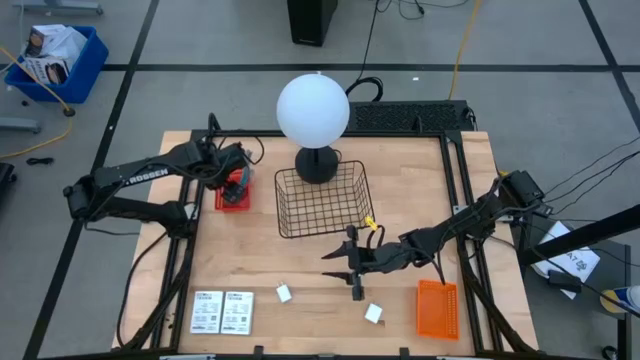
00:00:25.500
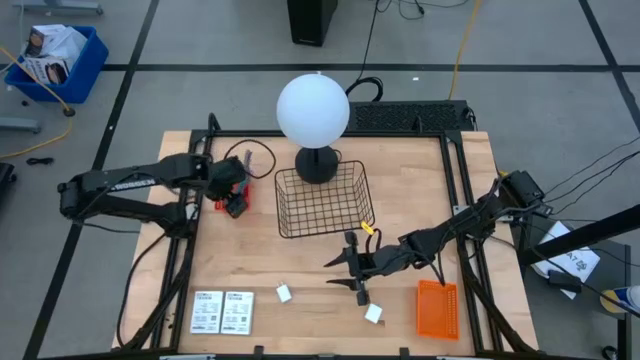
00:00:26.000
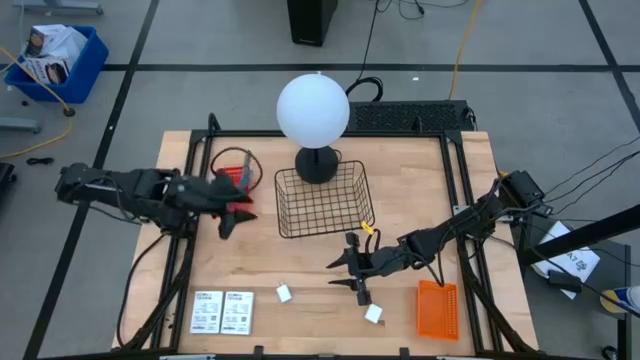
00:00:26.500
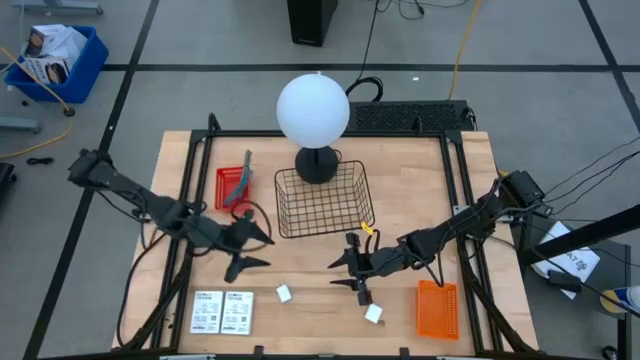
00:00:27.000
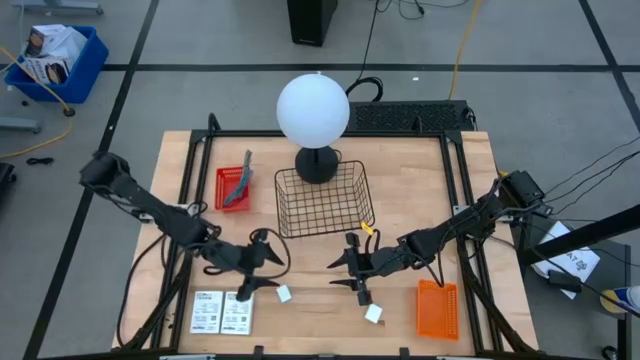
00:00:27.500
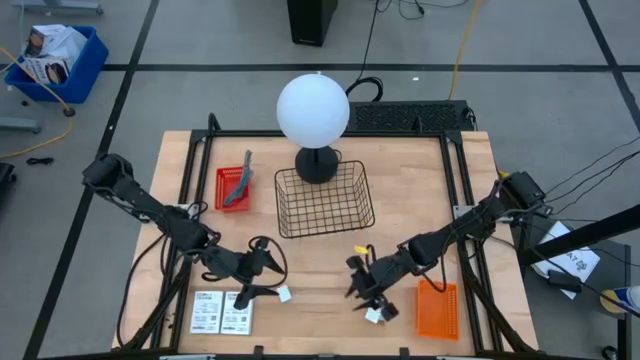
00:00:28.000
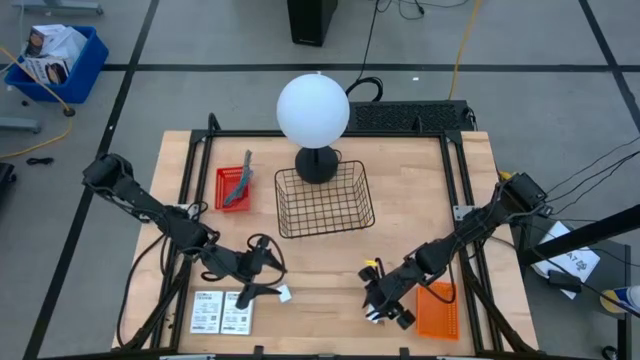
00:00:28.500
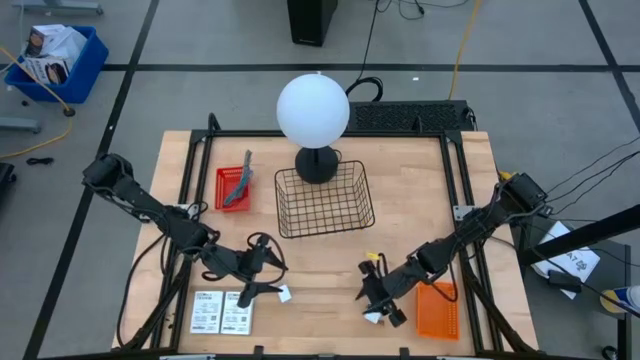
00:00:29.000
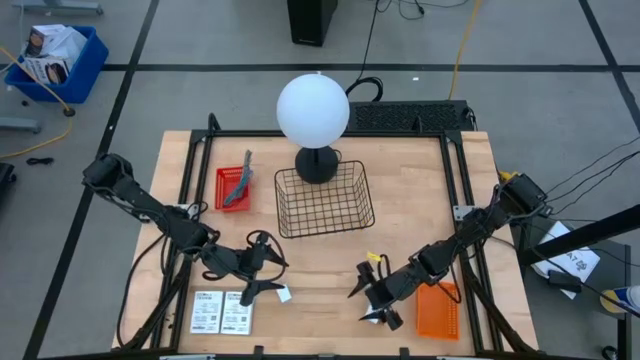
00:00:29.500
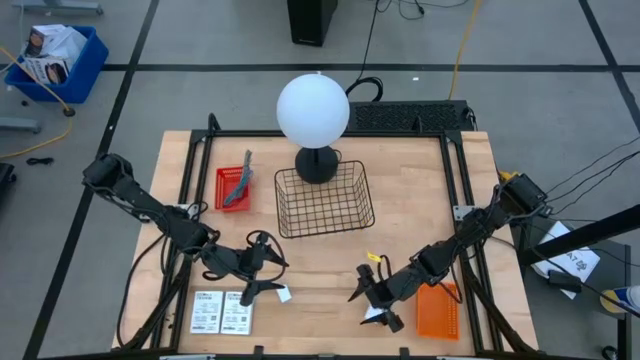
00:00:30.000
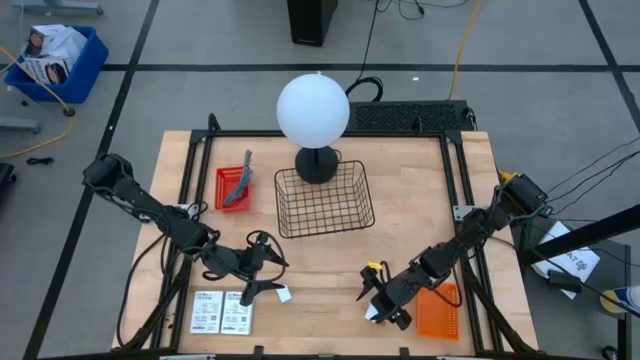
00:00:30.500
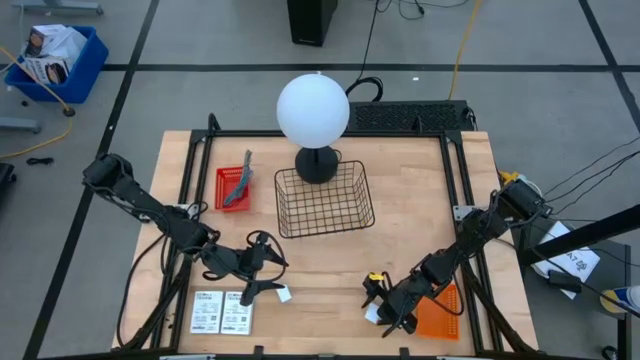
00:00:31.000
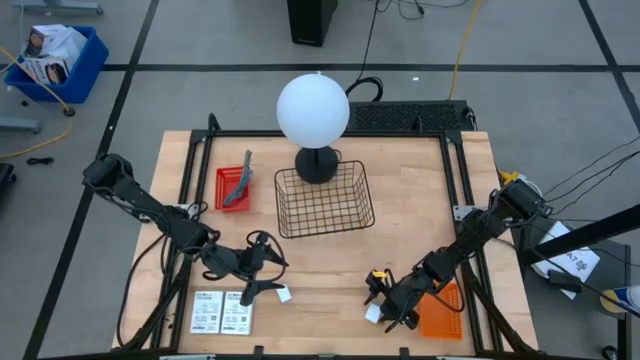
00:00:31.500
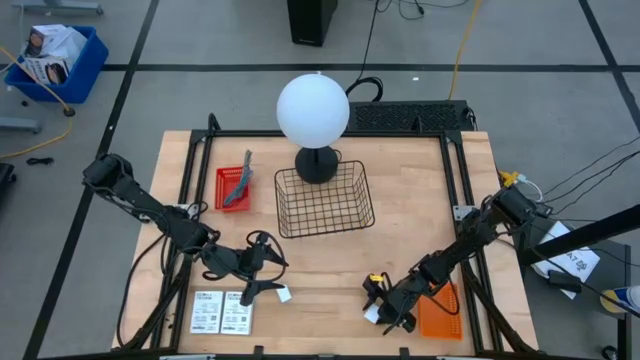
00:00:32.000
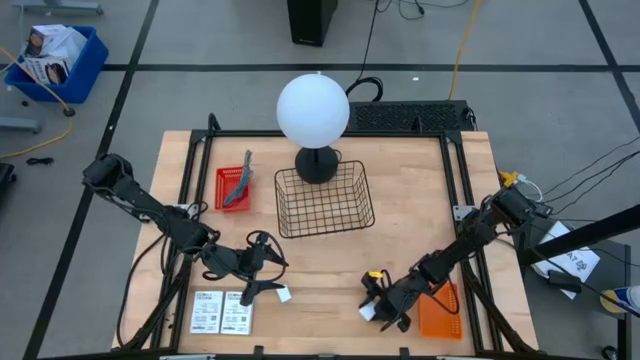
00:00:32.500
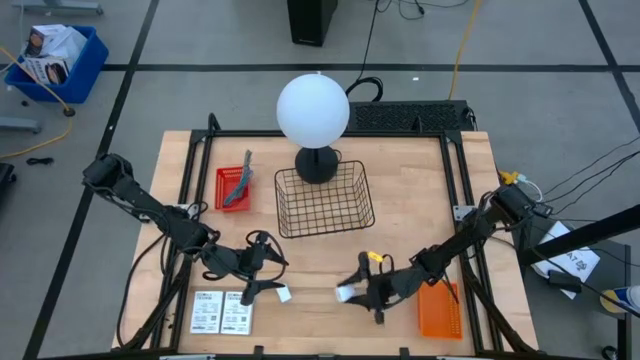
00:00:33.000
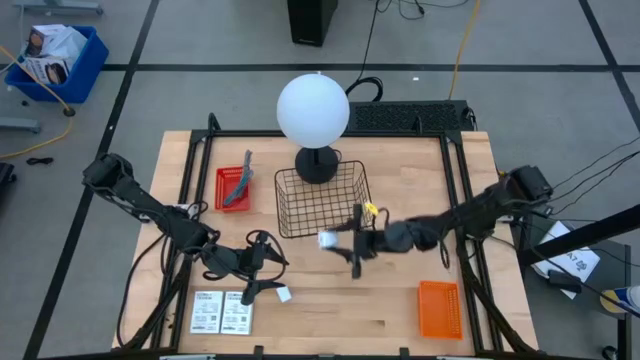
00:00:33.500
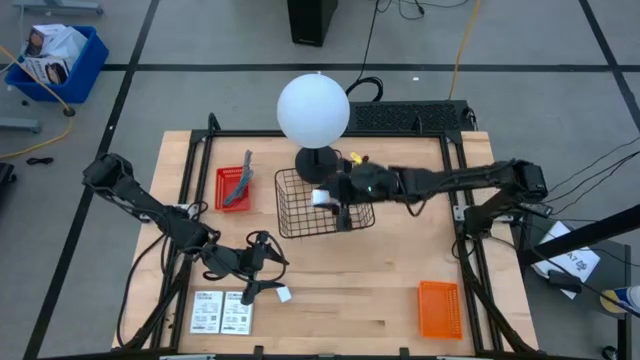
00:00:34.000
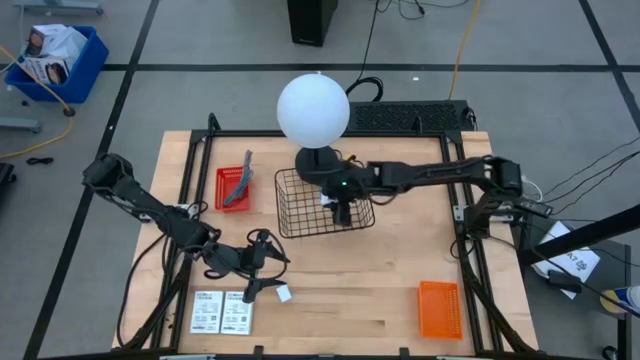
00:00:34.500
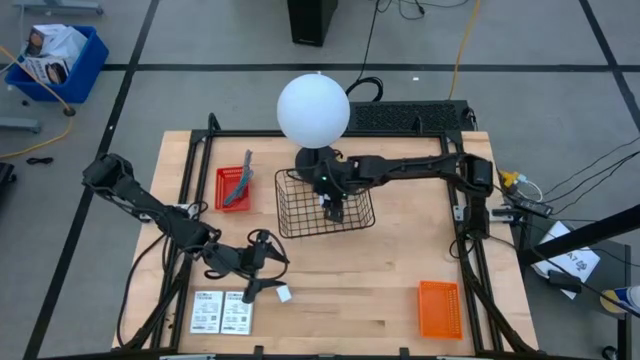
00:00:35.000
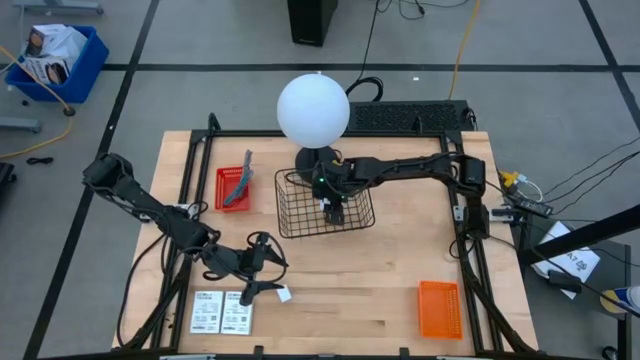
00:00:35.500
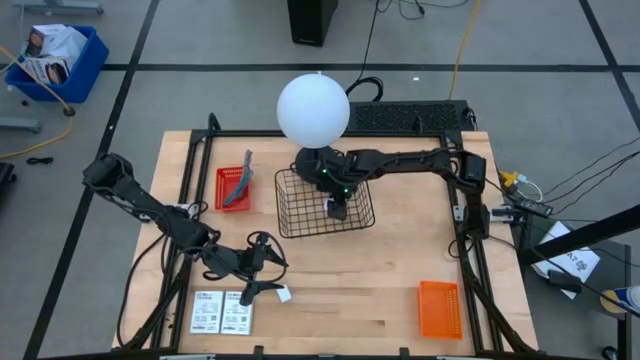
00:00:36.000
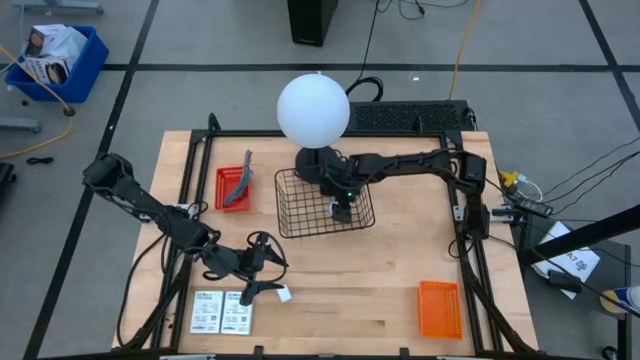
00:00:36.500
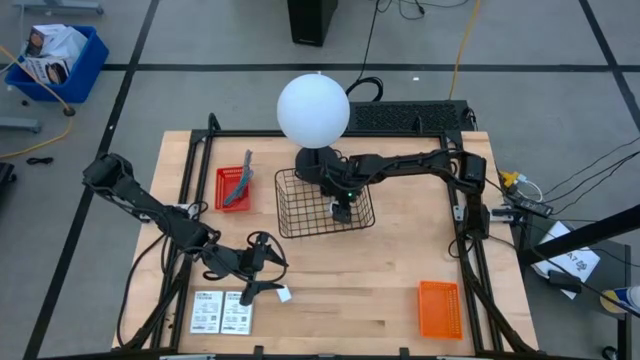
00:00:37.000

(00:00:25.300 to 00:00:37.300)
Task: Pick and place items into bin
Put the right white charger adapter into the wire basket

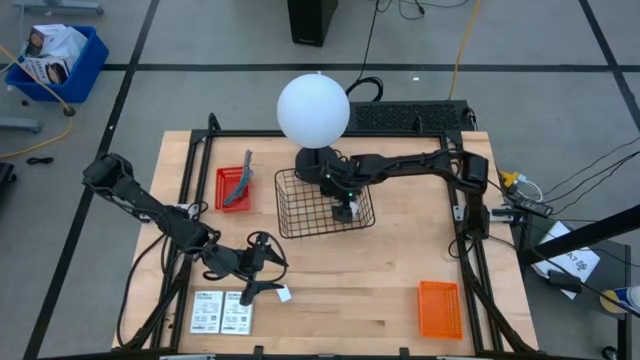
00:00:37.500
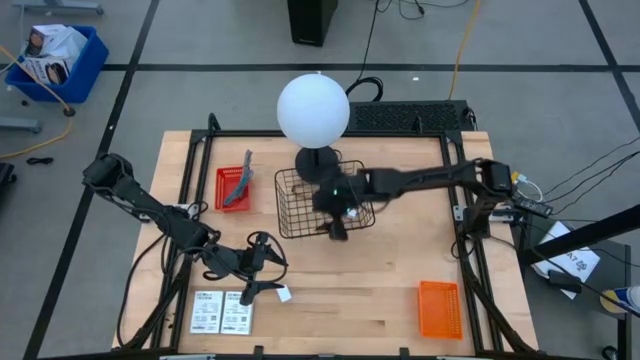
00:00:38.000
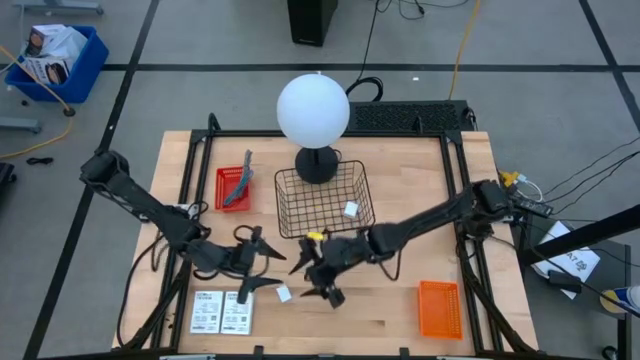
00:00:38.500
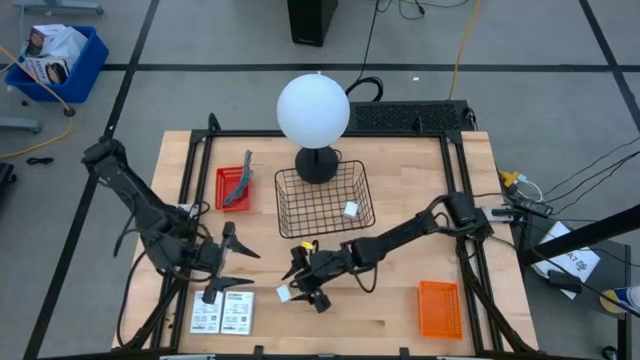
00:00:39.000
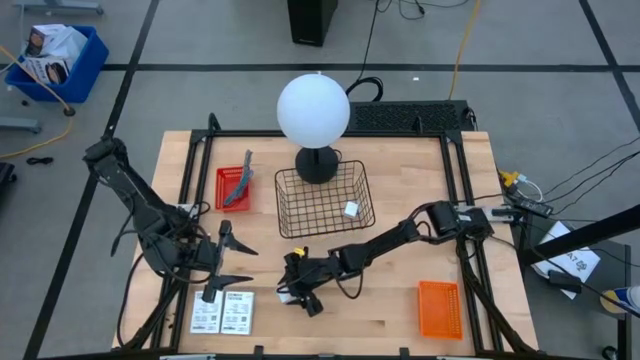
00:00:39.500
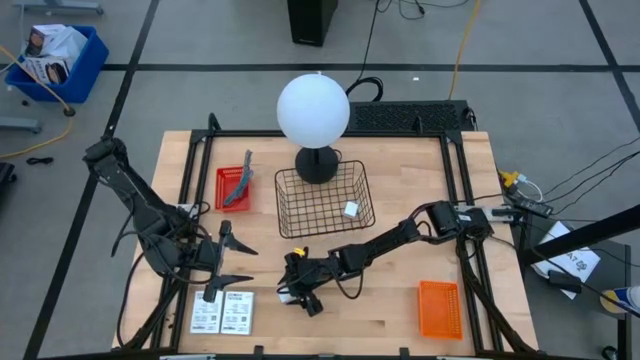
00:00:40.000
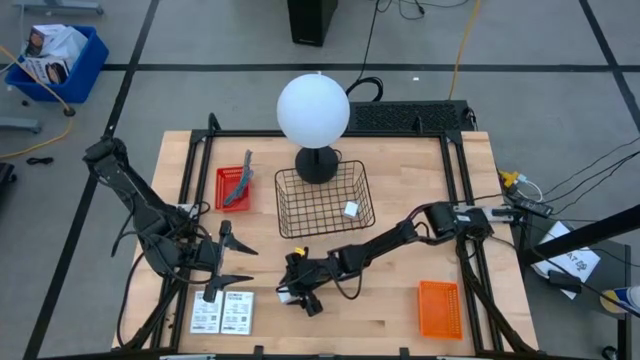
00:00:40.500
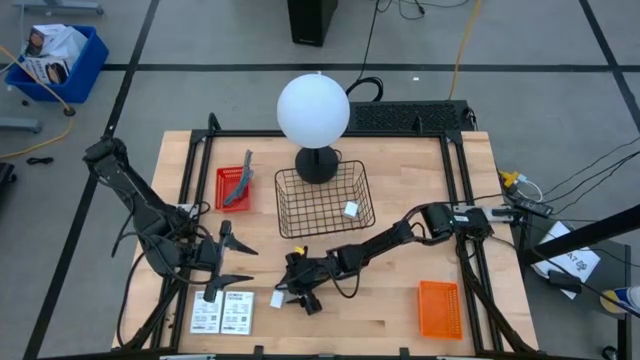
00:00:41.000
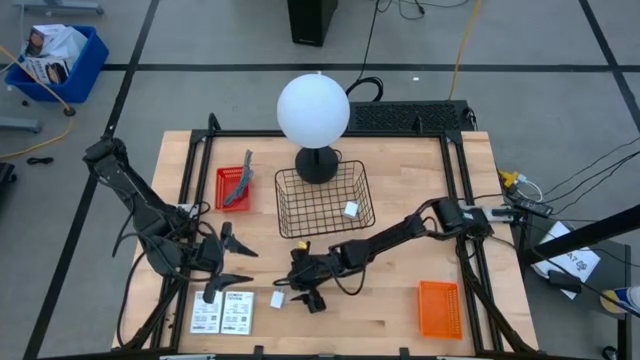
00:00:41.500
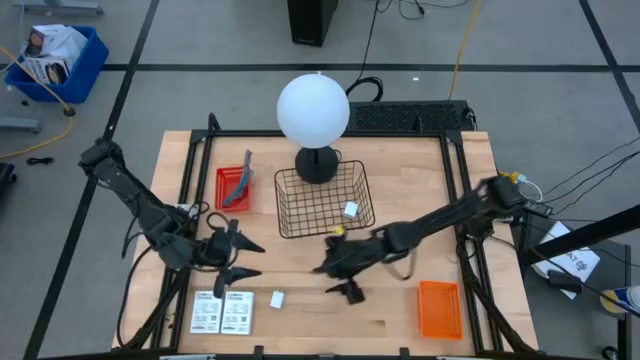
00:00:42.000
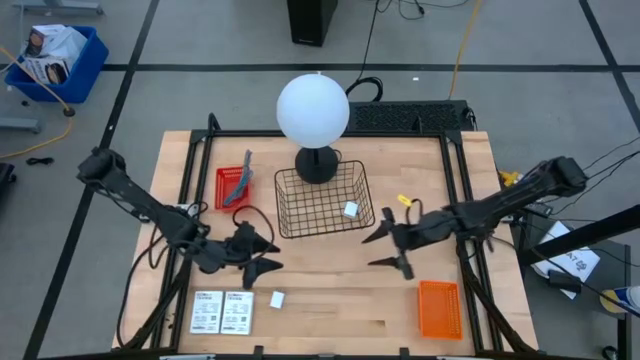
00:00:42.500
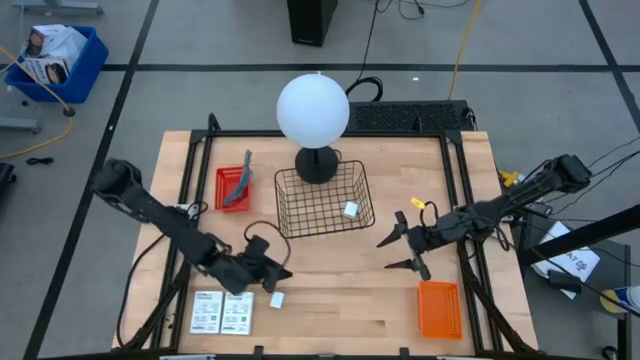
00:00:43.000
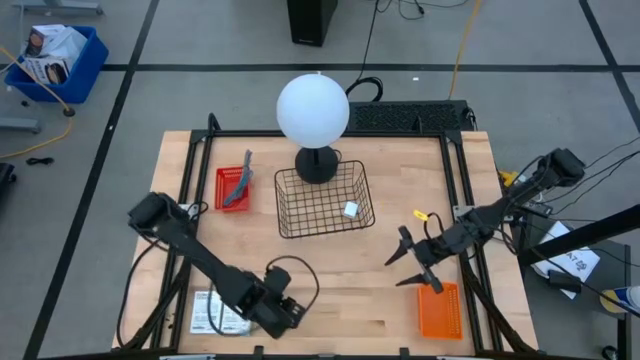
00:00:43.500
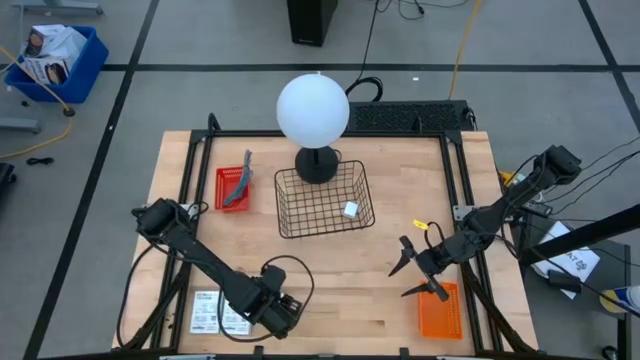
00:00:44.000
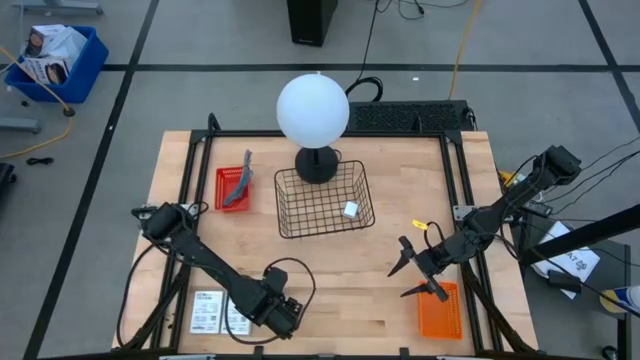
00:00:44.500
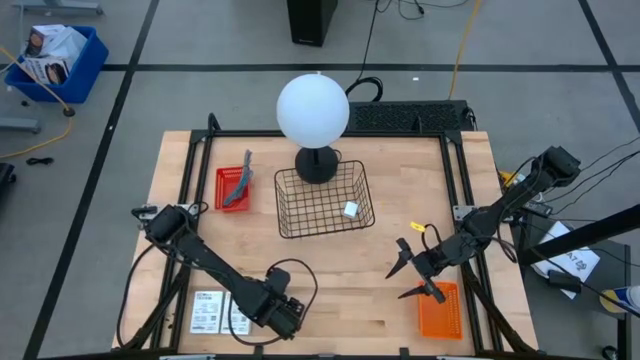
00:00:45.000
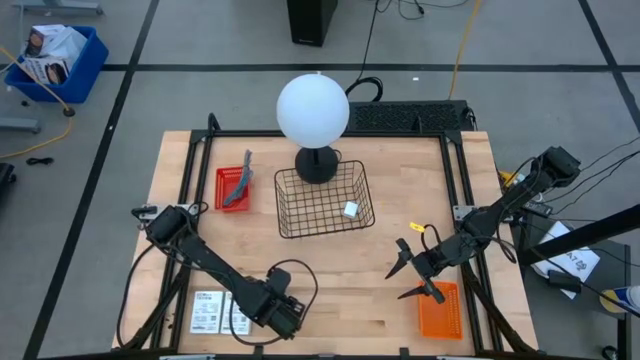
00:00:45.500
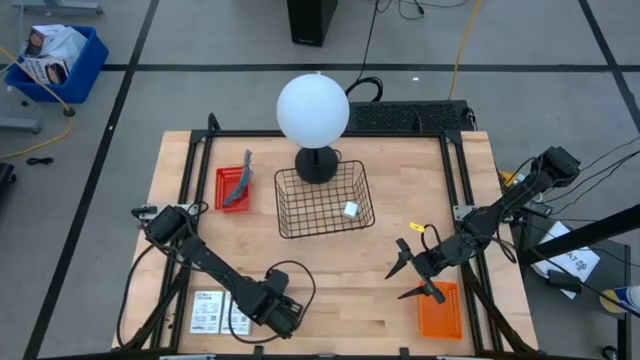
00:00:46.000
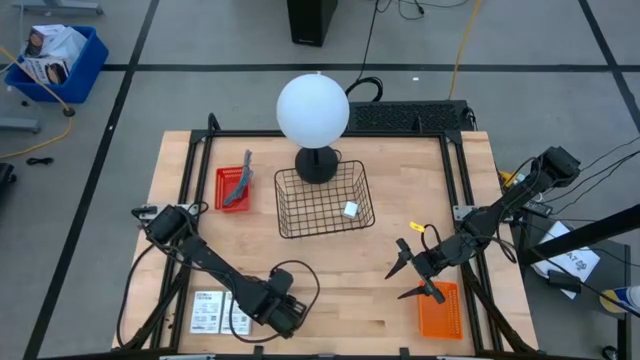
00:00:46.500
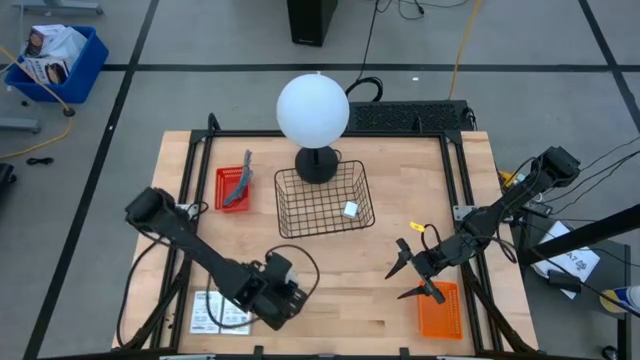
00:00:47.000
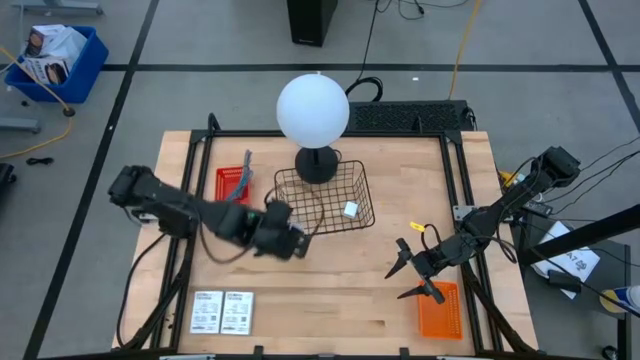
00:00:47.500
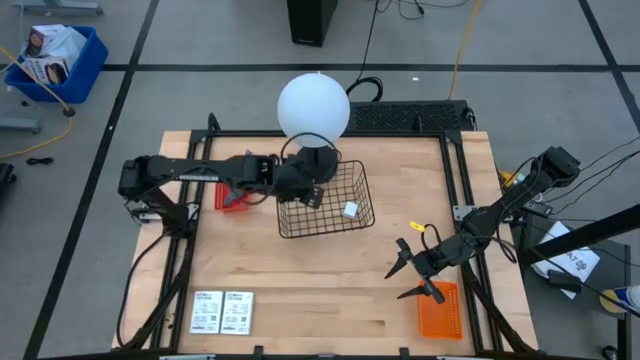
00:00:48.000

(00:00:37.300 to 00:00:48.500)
Put the white charger adapter into the wire basket
